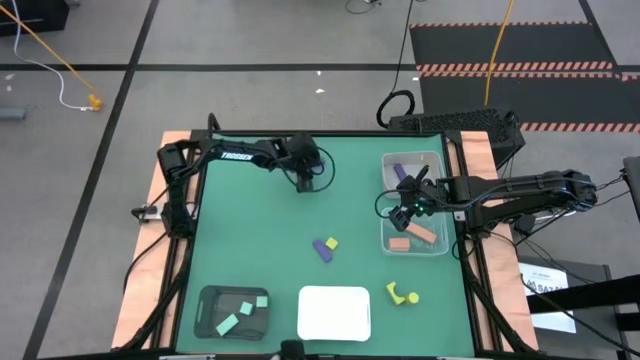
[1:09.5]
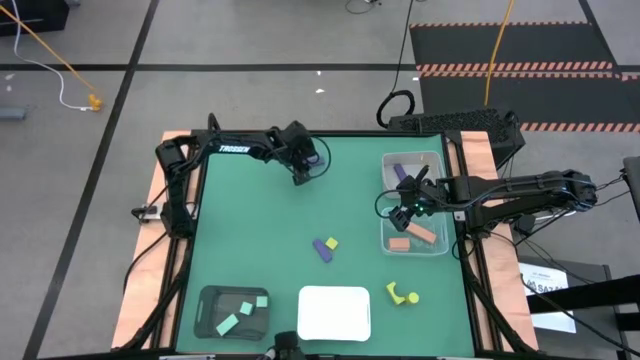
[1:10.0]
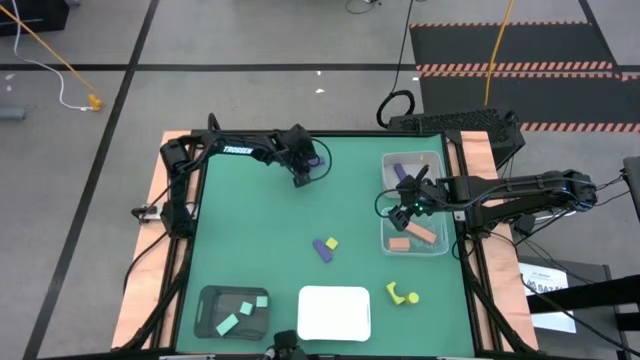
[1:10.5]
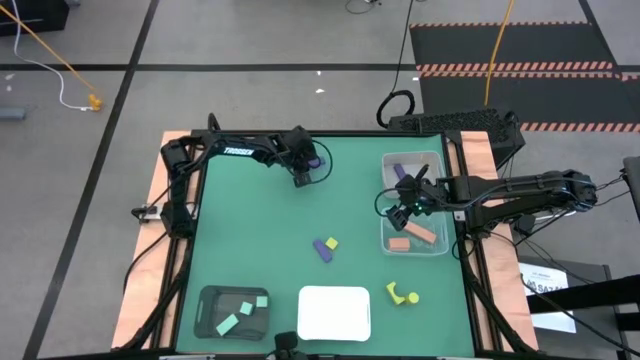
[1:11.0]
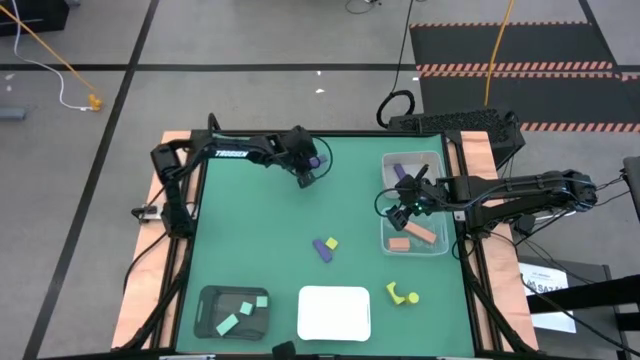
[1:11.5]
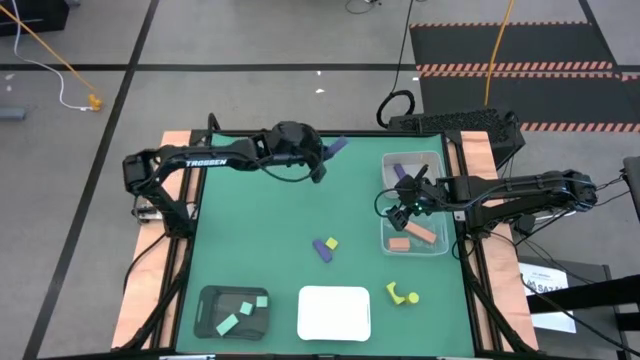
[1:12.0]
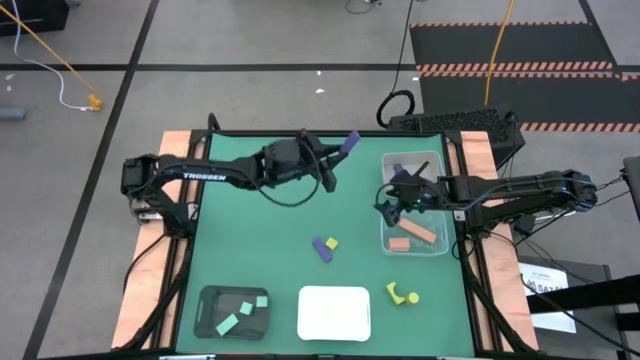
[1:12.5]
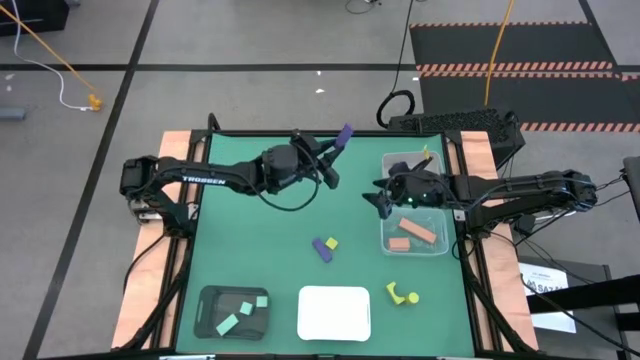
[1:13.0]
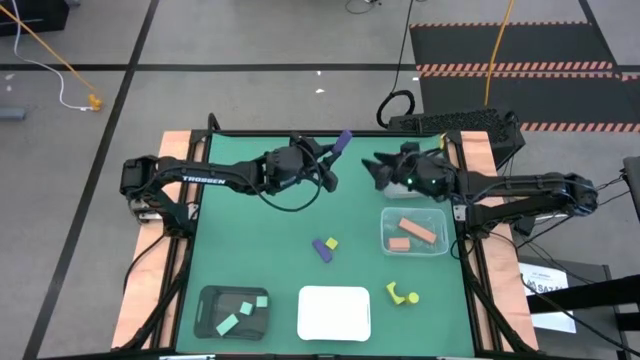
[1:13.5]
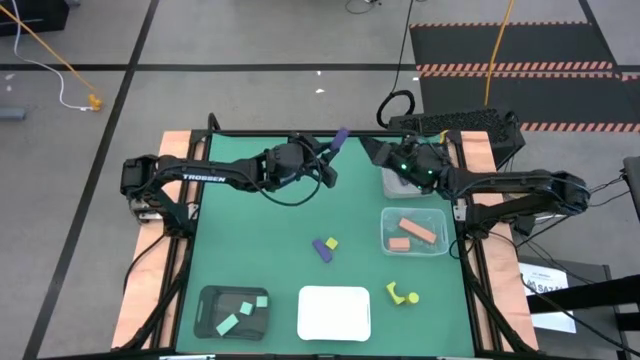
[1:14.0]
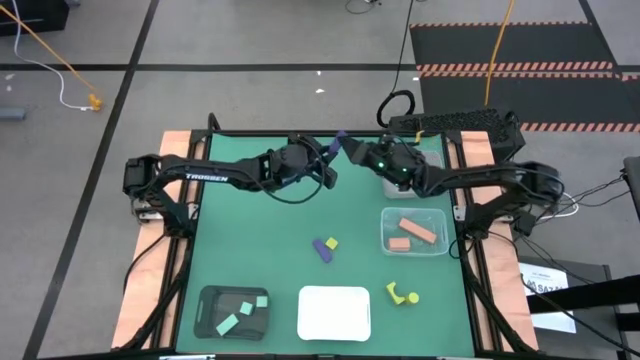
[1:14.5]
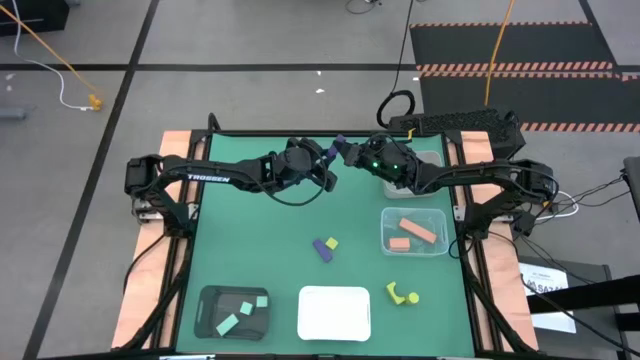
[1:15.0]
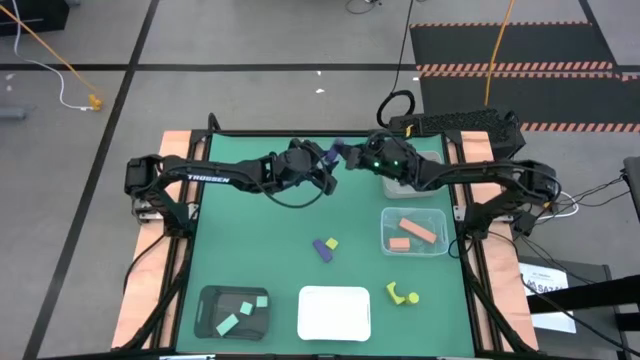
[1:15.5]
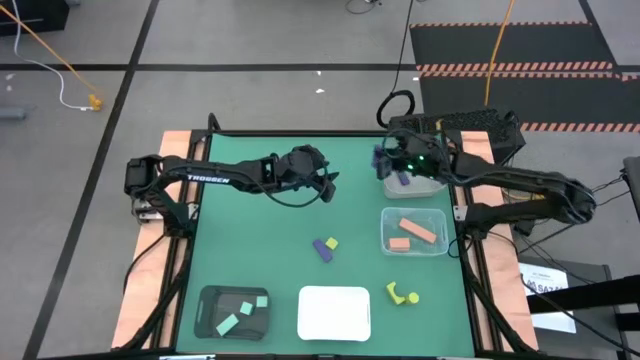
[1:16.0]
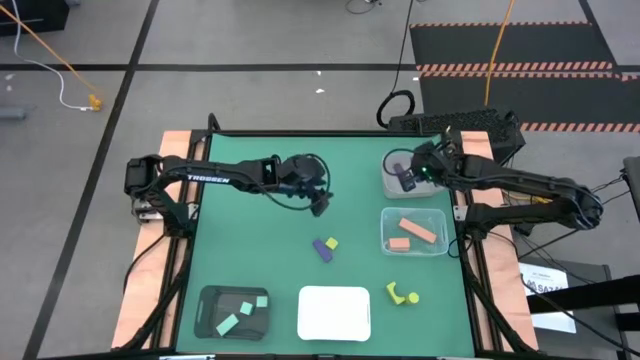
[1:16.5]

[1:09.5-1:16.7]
Task: Sort & place blocks by color
Put the top purple block into the gray bin

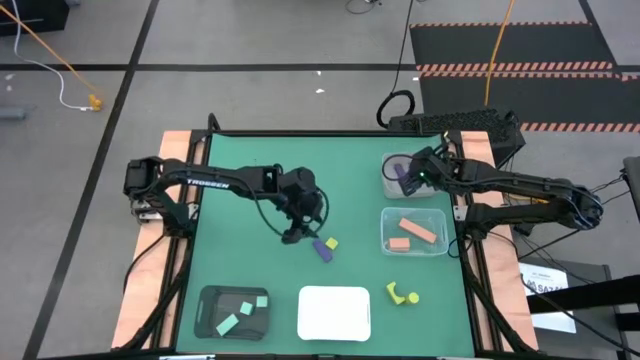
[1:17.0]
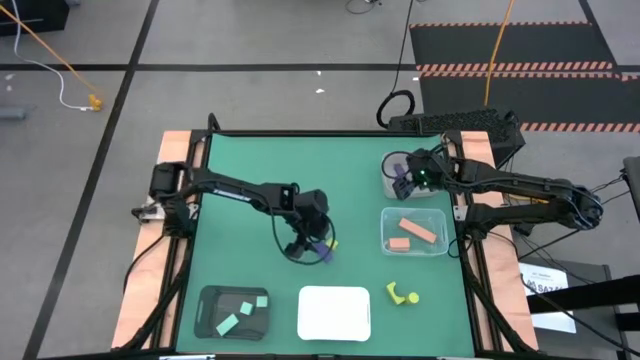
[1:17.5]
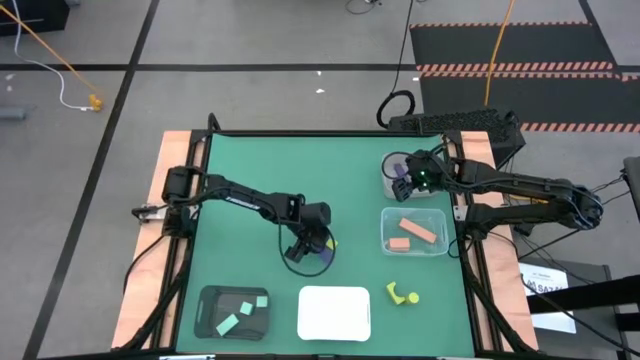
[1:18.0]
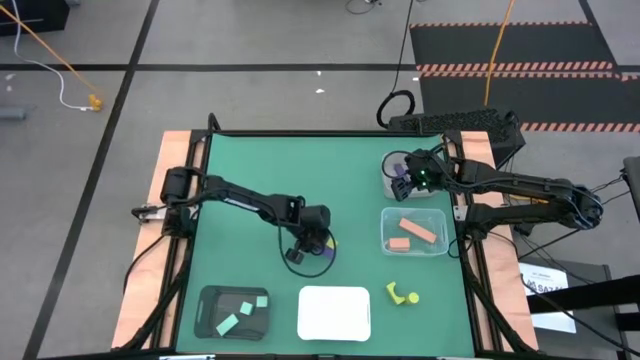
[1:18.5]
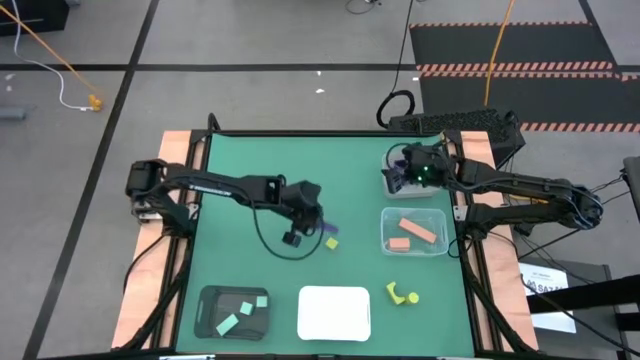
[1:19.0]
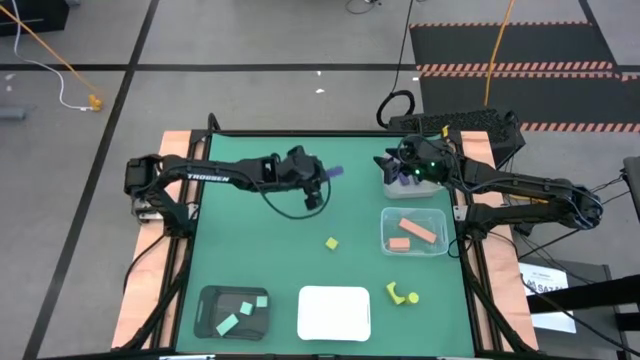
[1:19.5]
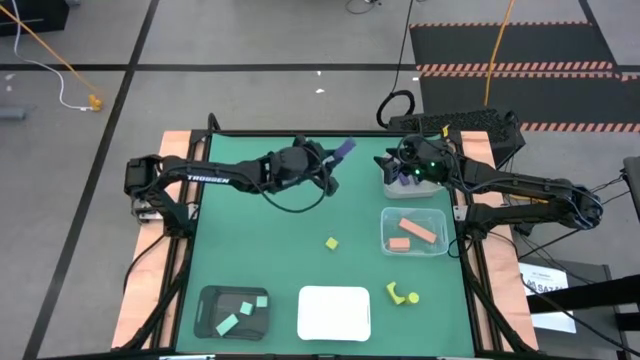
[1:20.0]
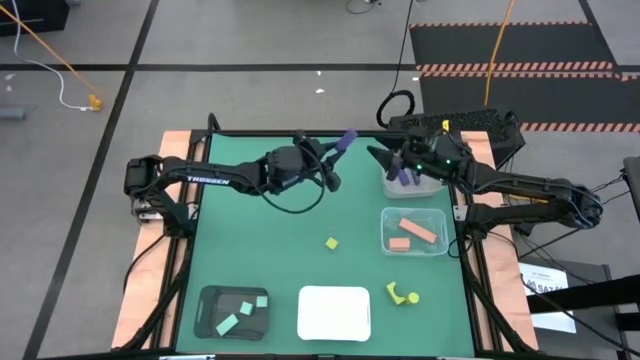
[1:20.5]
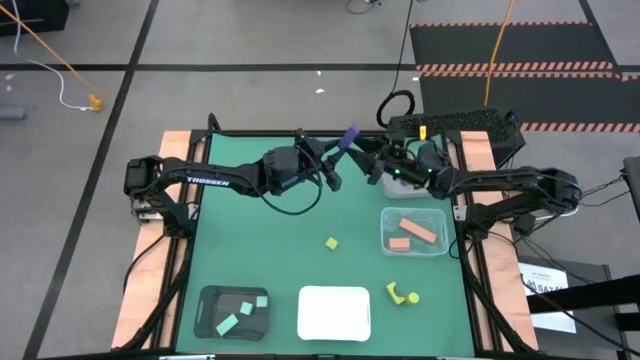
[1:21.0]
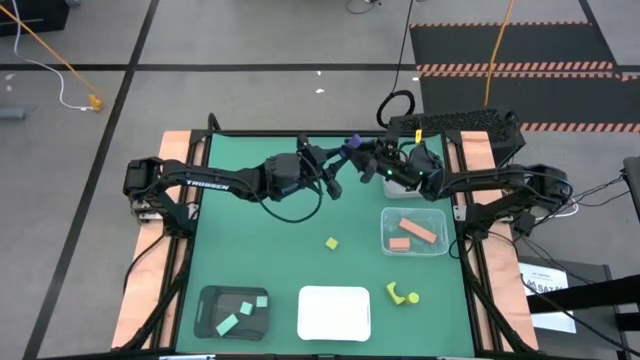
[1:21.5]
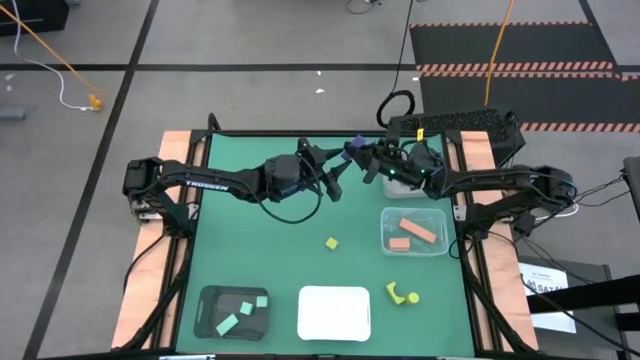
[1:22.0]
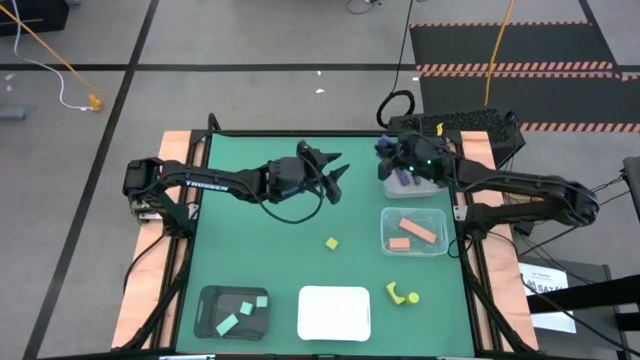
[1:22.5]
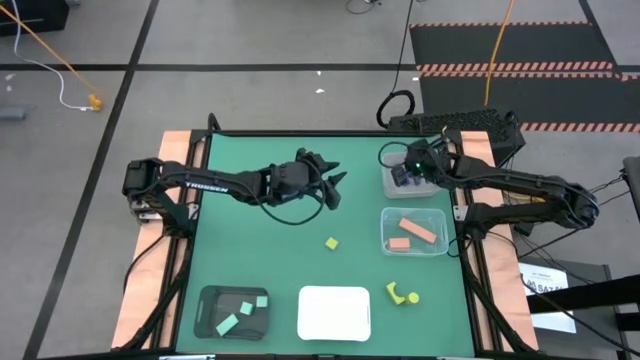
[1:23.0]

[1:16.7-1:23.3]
Put the purple block into the gray bin

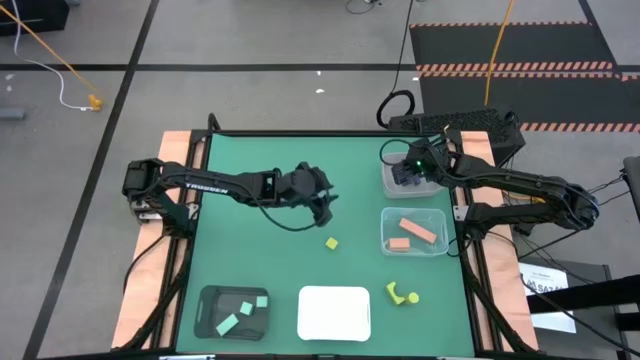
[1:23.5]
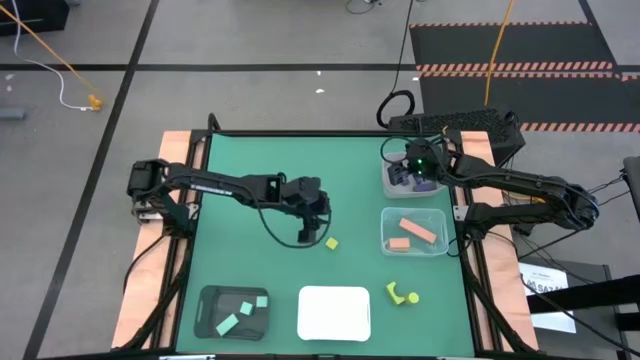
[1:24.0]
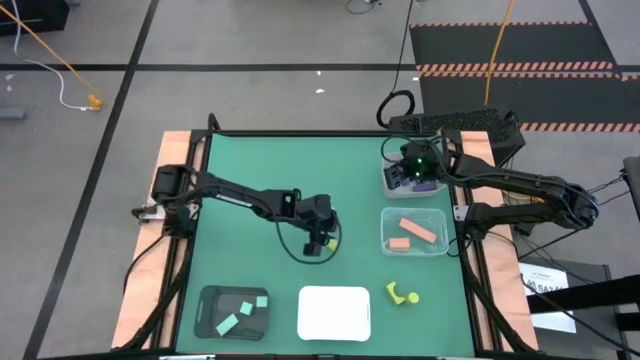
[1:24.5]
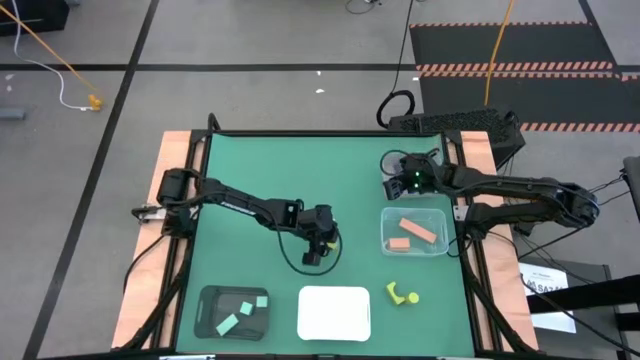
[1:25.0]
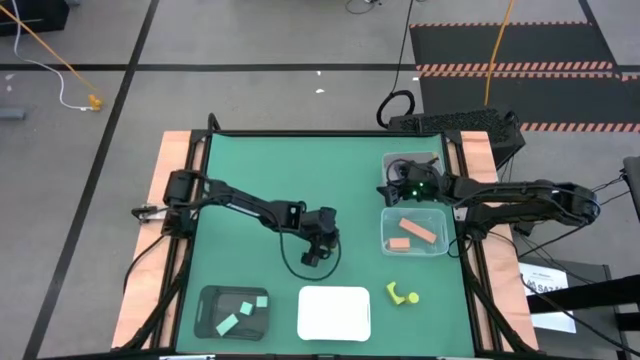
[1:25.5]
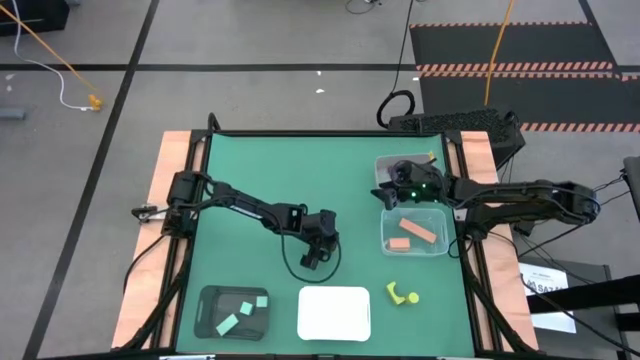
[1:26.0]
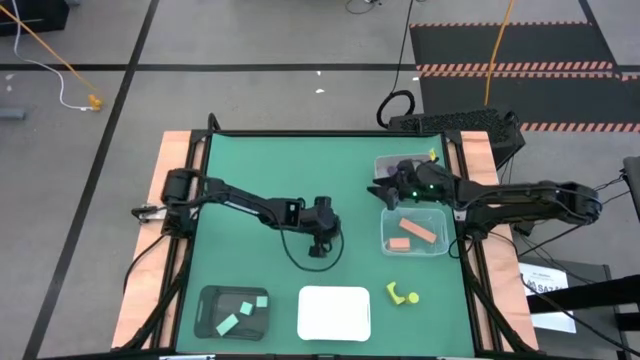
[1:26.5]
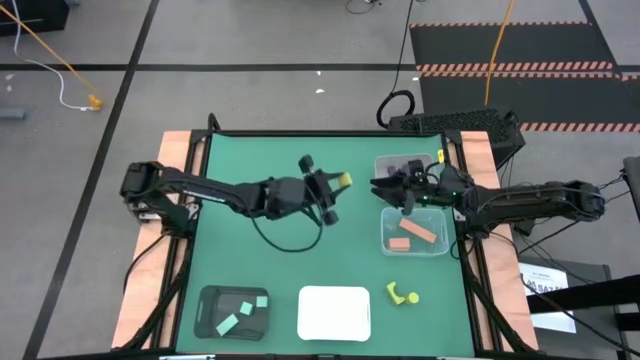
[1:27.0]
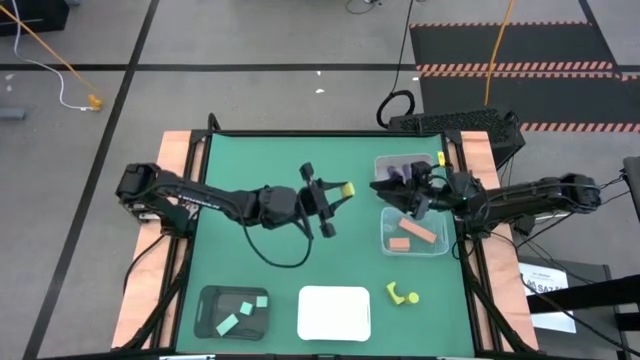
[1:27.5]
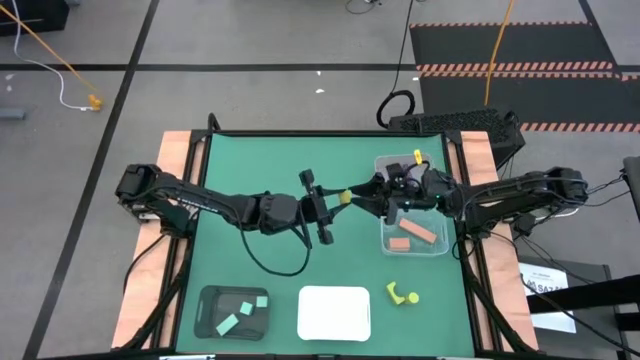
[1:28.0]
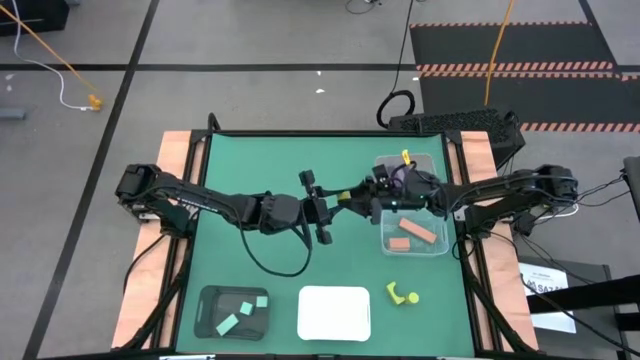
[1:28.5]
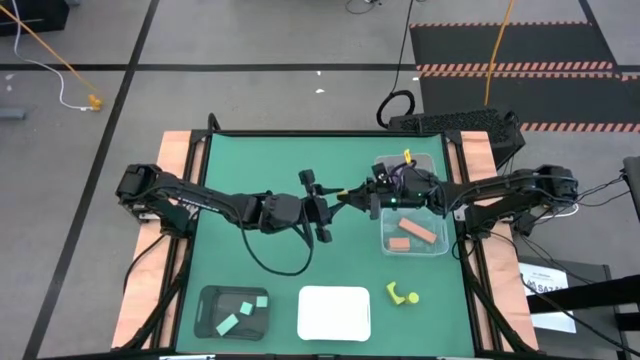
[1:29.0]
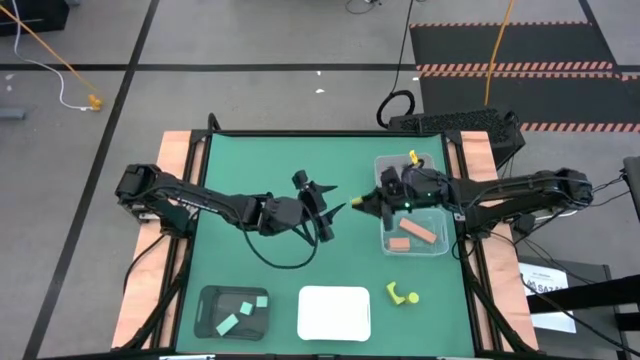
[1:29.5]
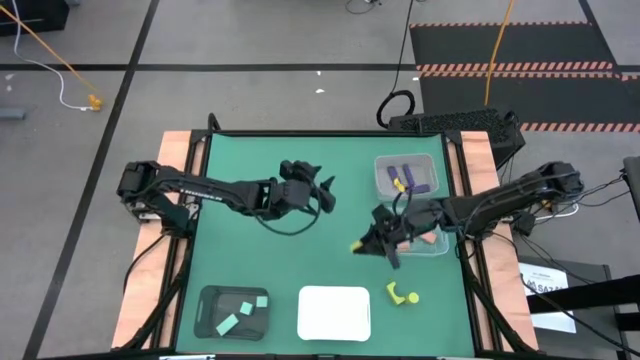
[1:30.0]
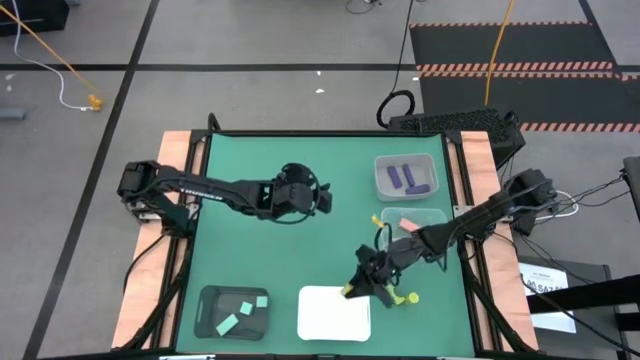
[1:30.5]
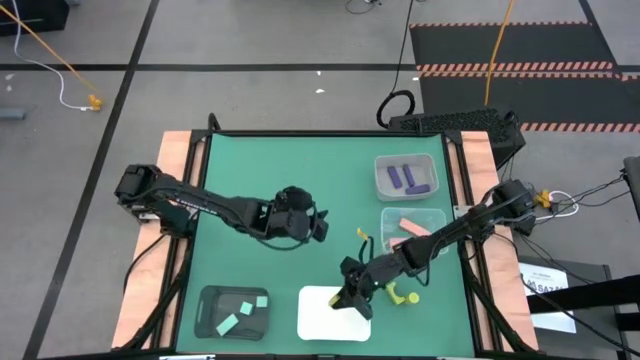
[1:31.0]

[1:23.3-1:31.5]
Put the top green block into the white bin
